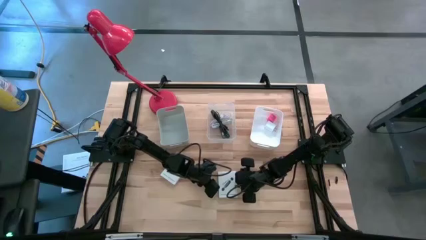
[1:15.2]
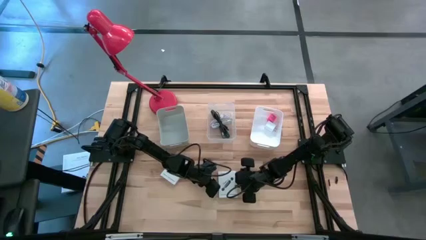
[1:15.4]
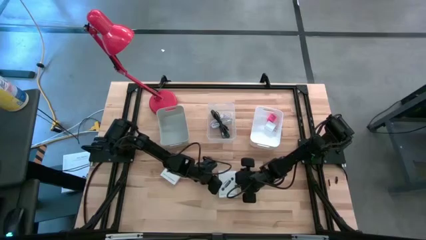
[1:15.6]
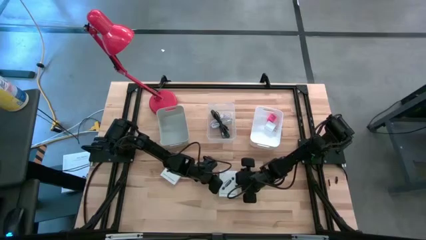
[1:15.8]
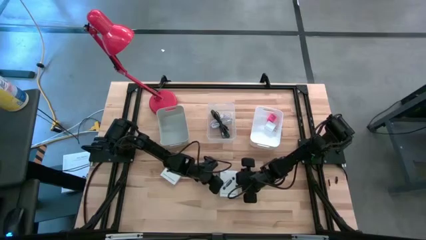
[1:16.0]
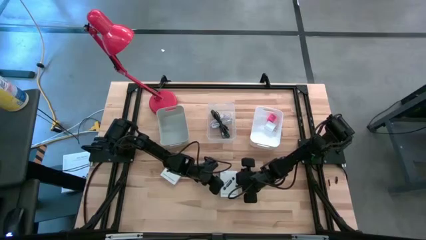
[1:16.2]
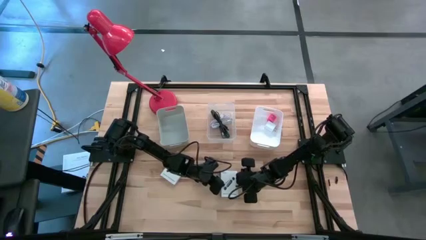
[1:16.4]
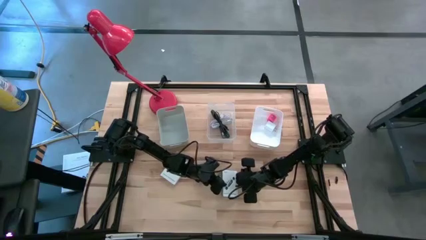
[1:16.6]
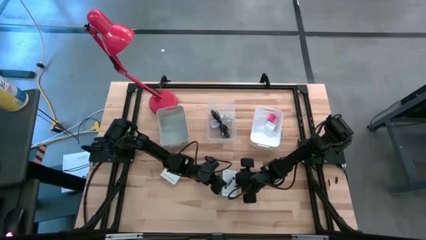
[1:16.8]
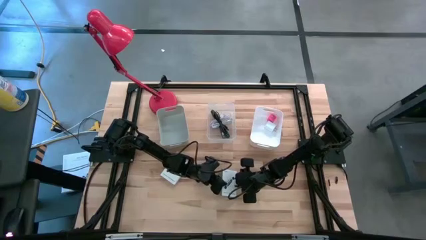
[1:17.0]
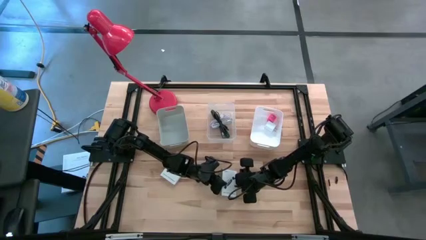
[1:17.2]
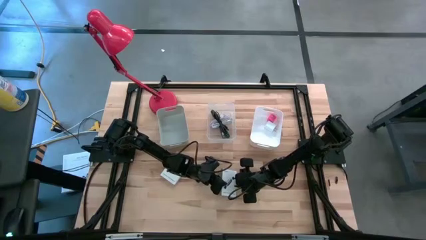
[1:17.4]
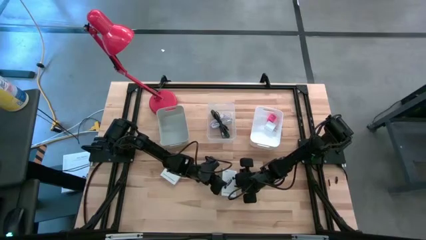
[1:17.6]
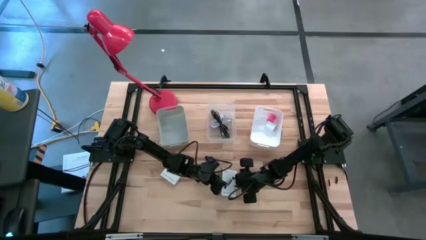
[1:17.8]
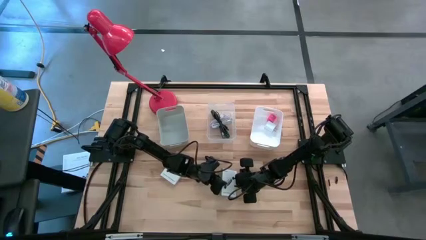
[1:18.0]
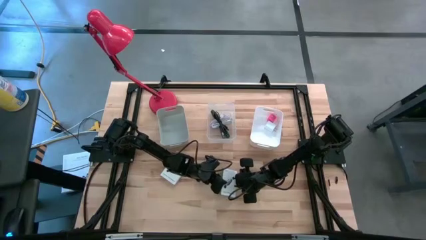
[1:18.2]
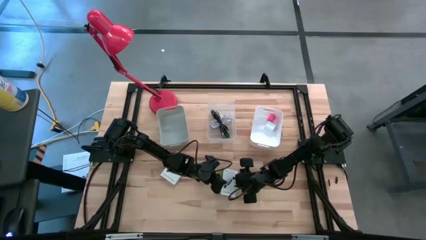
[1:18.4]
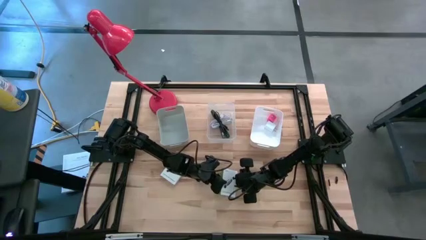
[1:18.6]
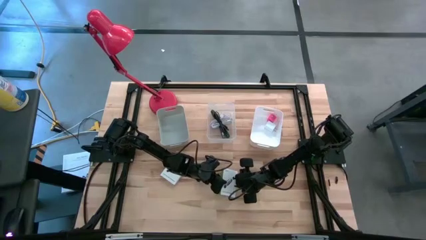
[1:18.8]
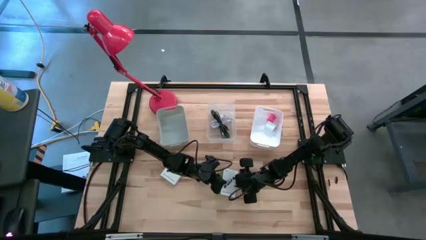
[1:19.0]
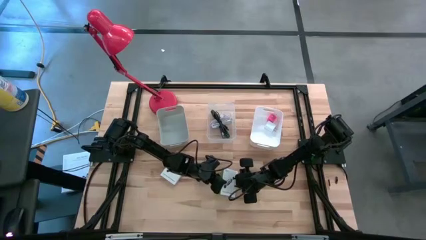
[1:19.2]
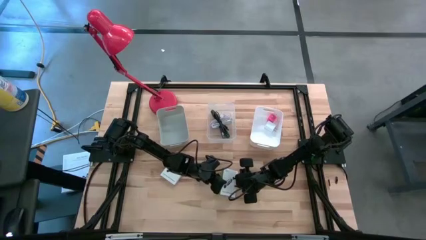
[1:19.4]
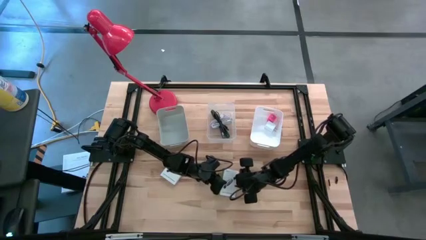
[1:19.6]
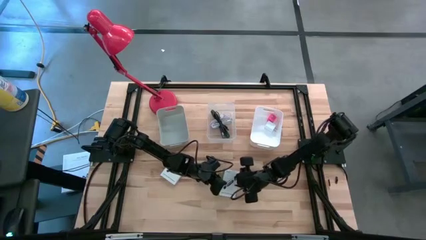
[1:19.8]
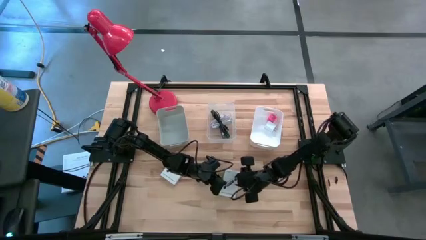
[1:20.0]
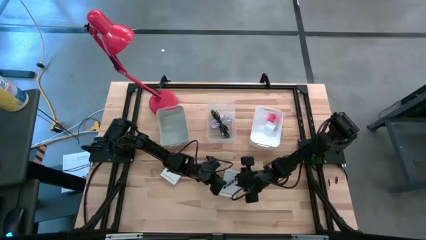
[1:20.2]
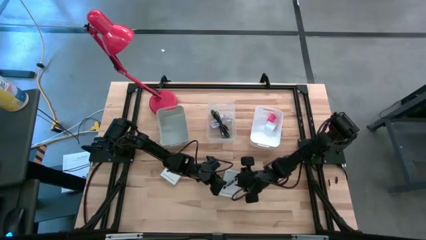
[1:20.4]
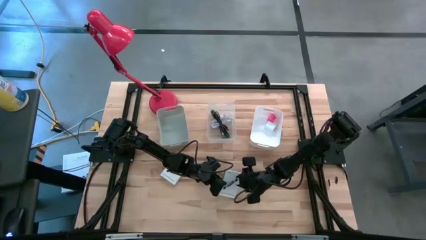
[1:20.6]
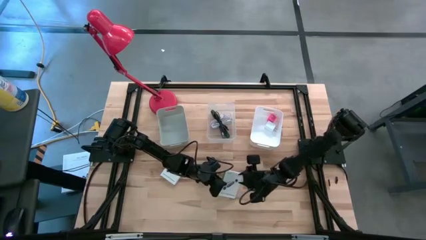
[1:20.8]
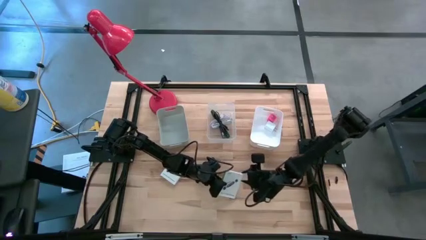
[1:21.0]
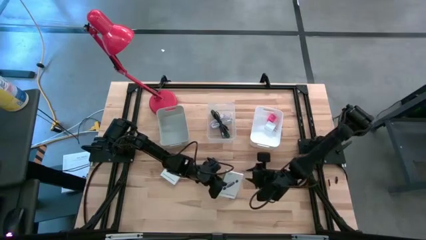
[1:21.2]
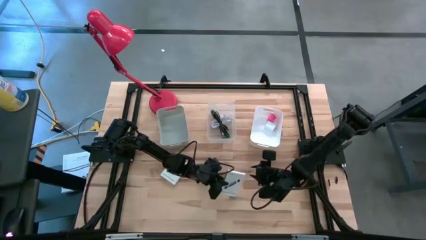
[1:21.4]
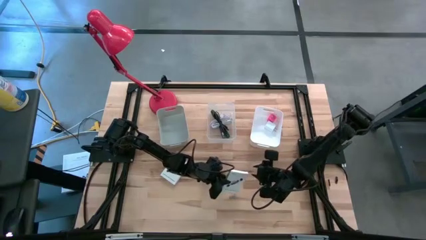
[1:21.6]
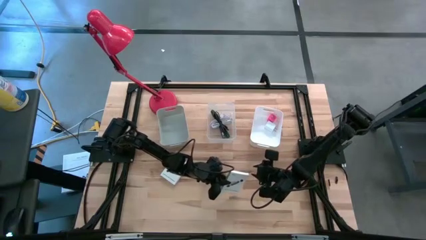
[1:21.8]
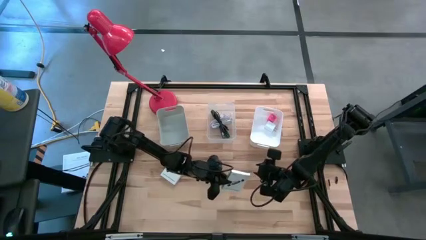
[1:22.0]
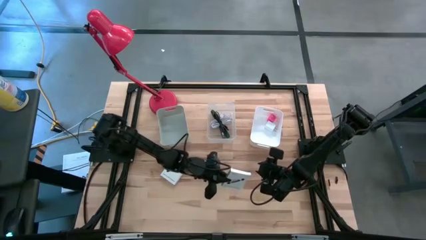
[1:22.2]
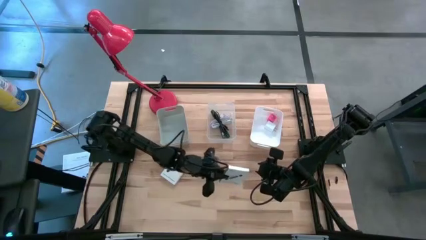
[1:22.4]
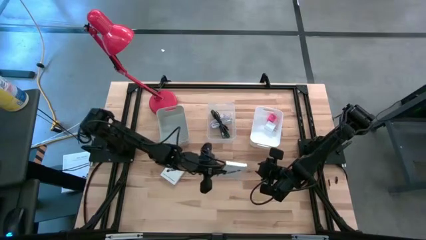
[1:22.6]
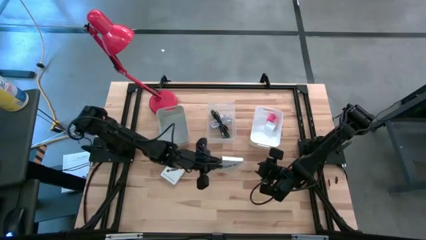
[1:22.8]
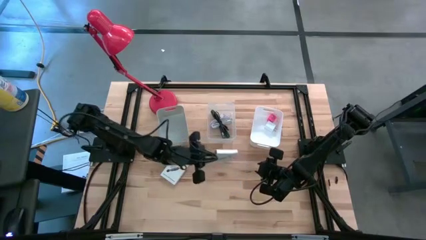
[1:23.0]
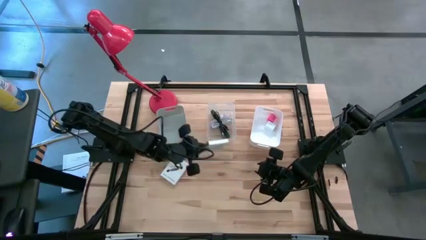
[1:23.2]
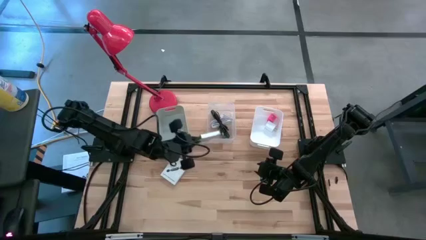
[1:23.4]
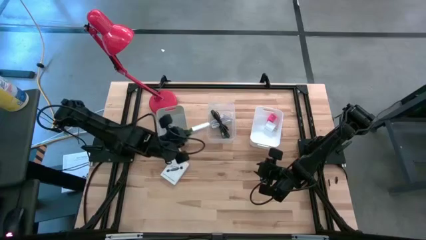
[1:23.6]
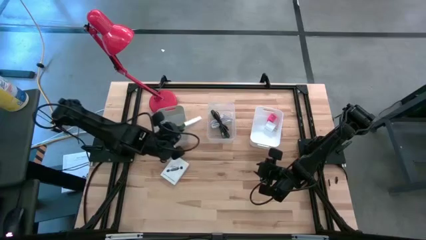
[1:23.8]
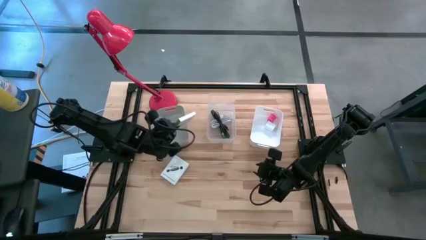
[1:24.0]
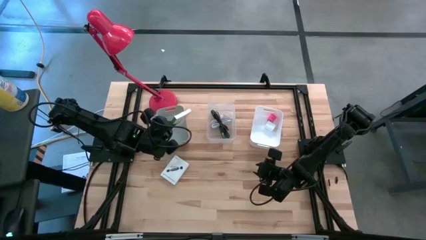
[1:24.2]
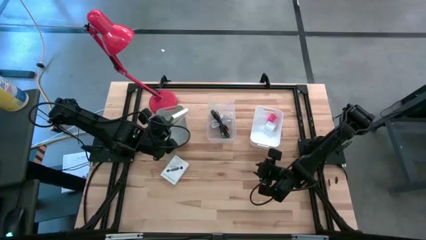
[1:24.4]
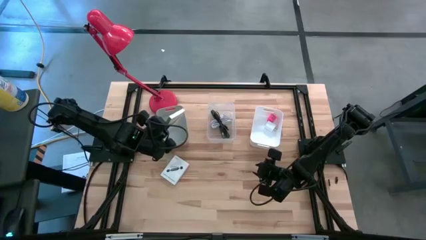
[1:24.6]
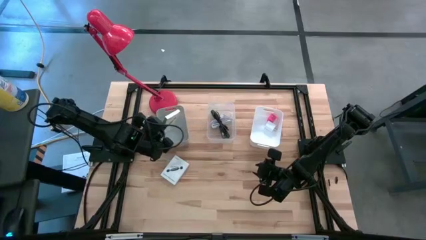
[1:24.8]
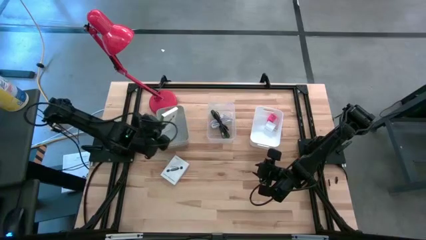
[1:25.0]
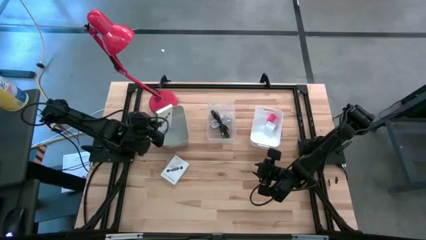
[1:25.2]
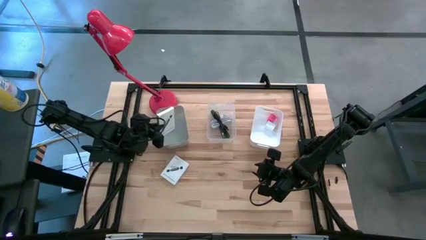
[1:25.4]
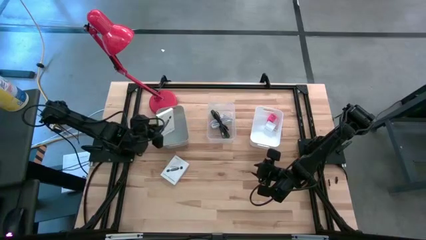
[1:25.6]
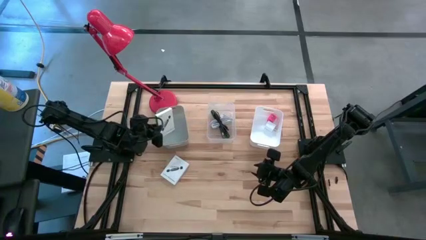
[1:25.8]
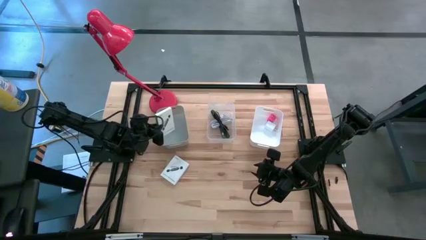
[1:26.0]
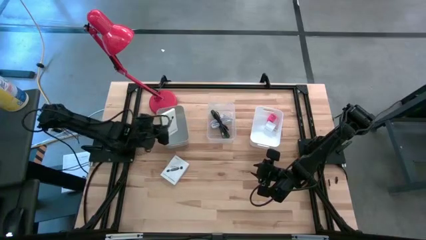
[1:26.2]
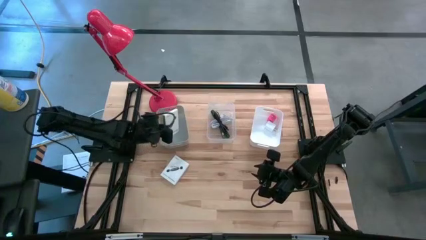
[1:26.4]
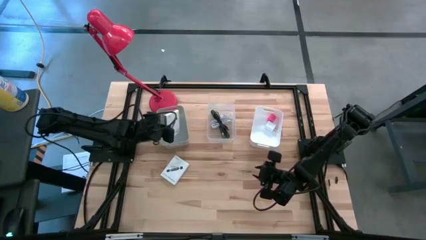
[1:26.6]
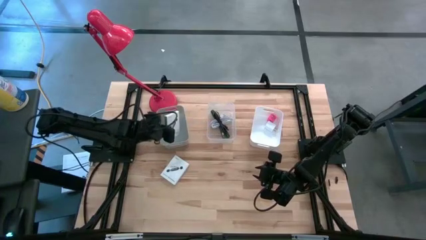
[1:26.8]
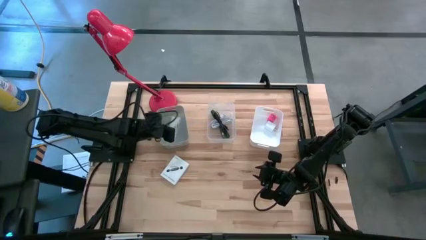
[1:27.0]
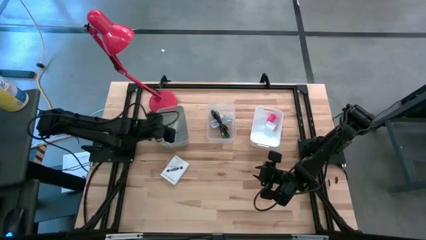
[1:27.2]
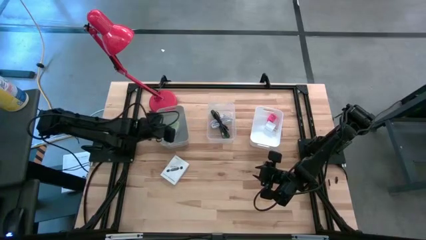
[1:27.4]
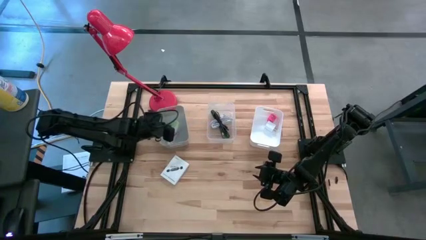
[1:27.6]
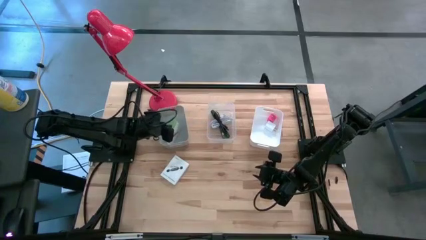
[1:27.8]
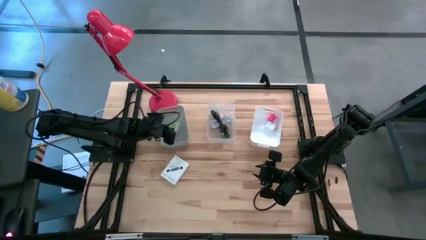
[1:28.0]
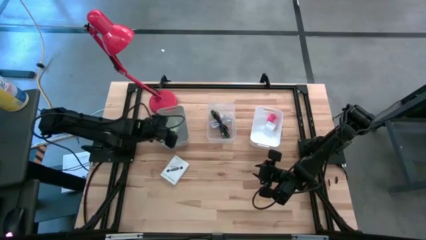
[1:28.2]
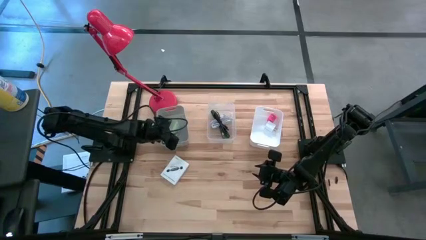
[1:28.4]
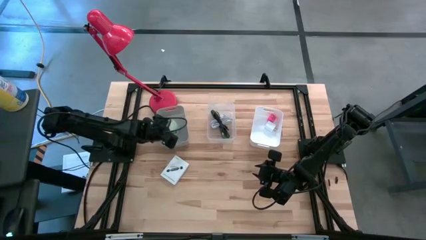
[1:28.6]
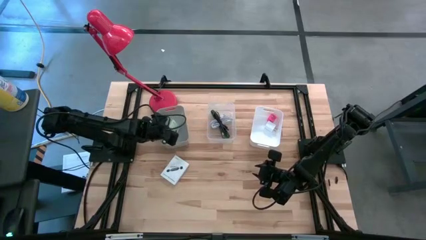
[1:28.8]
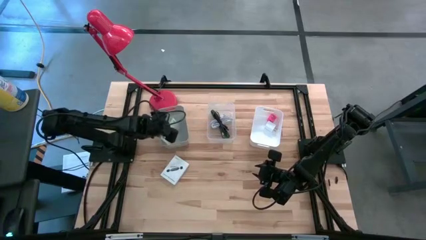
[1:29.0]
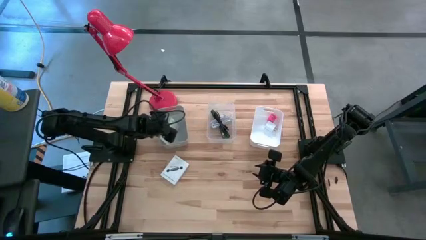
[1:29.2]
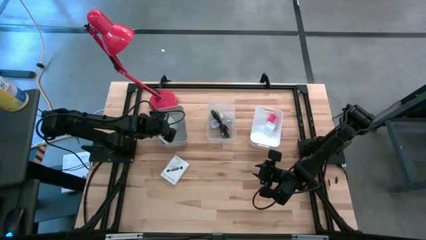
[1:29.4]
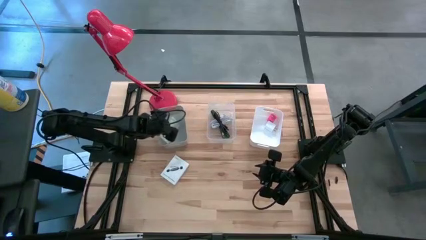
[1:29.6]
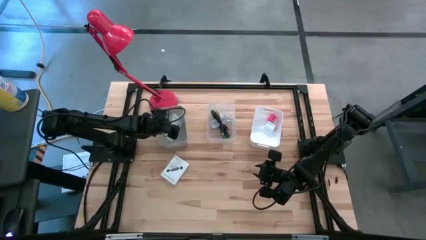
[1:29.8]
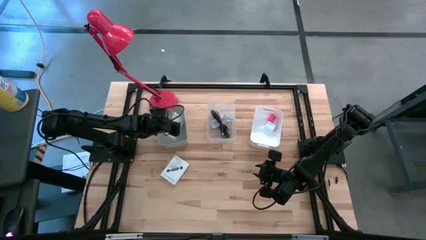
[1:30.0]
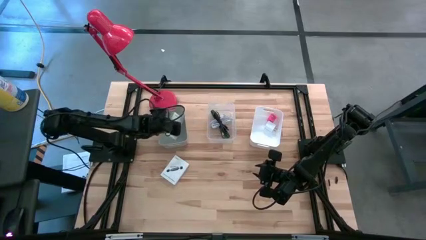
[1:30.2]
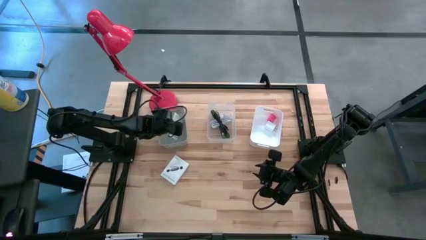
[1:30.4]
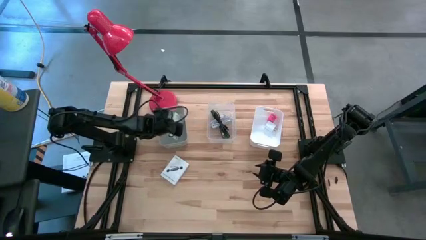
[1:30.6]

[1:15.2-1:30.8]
Task: Pick and place items into bin
Put the right white card reader box into the gray bin

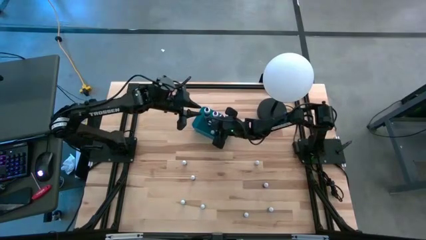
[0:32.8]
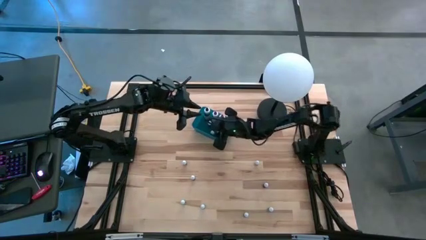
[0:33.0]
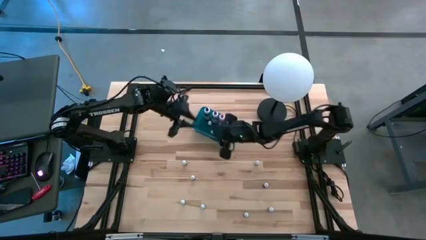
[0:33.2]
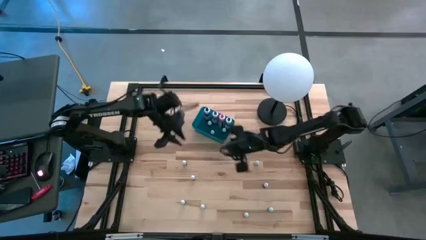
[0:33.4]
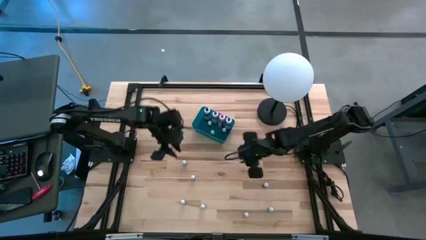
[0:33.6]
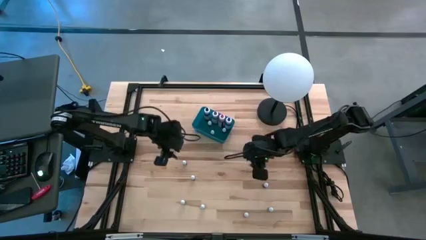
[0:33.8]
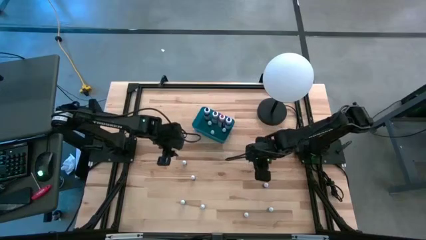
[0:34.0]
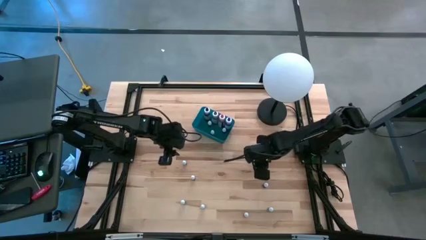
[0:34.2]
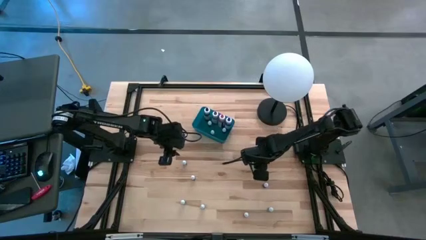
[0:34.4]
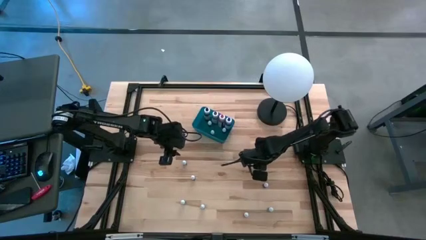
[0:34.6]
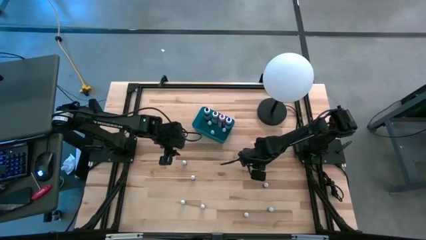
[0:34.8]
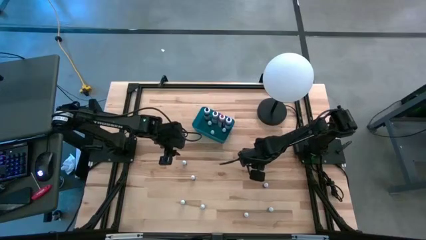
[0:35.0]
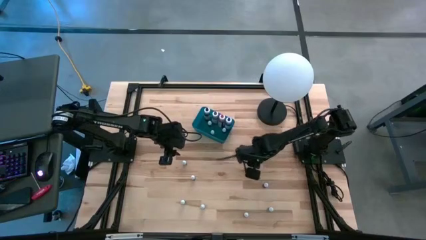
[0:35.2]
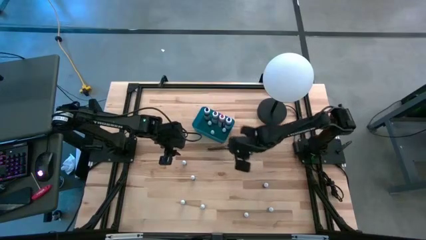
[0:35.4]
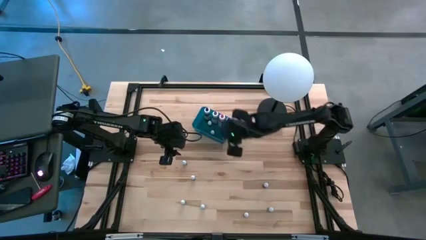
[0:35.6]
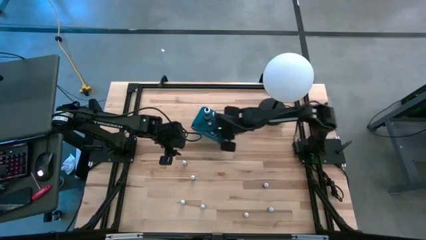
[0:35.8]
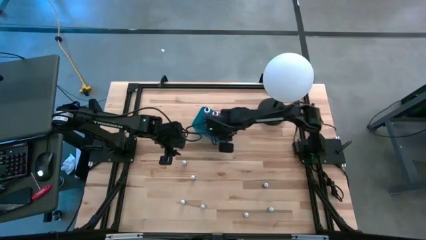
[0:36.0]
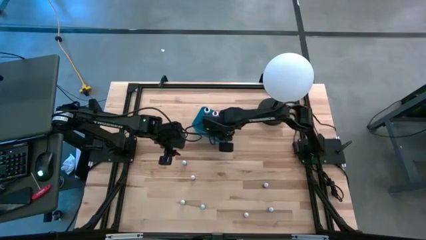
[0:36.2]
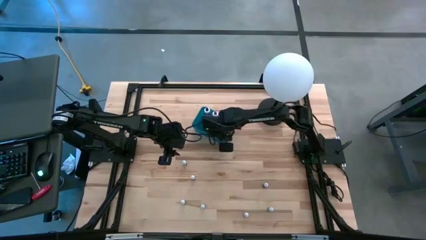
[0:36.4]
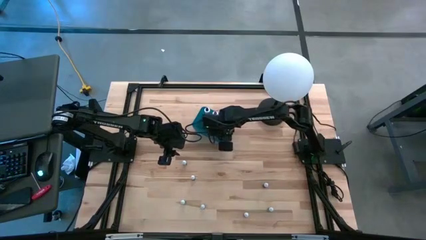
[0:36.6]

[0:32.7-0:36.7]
Task: Pick & Place food coloring
Put the small green food coloring bottle into the blue bin
